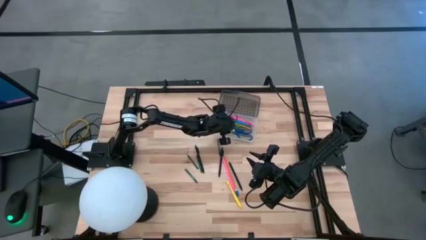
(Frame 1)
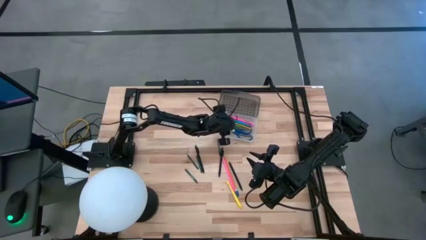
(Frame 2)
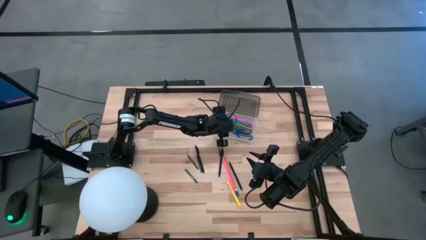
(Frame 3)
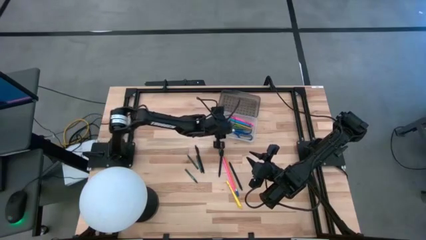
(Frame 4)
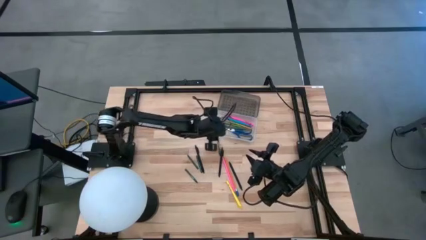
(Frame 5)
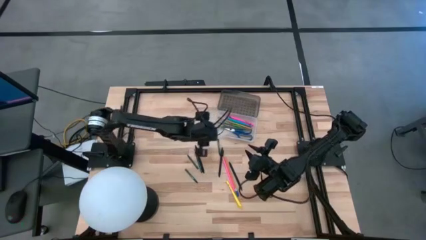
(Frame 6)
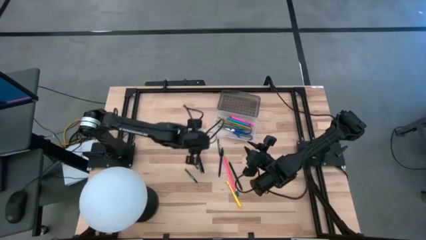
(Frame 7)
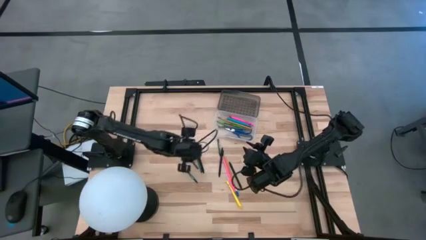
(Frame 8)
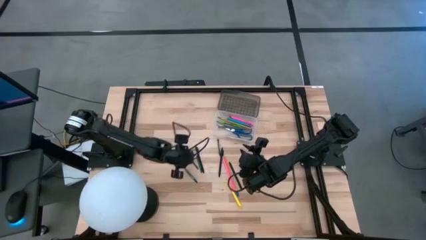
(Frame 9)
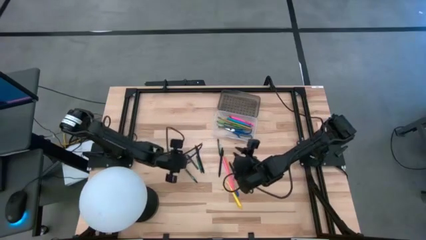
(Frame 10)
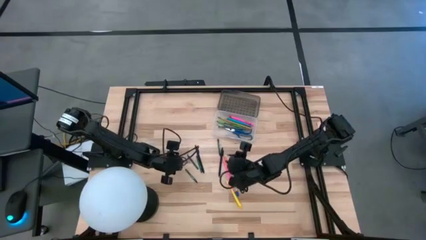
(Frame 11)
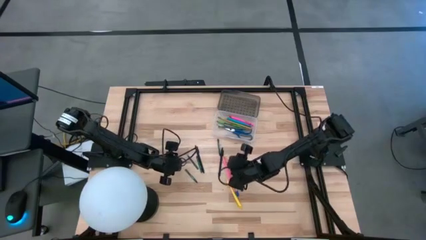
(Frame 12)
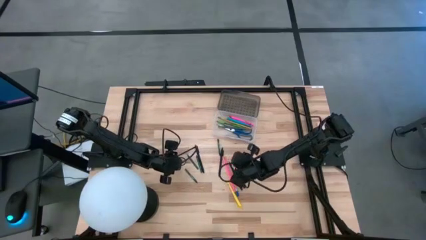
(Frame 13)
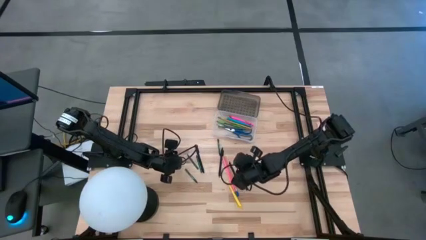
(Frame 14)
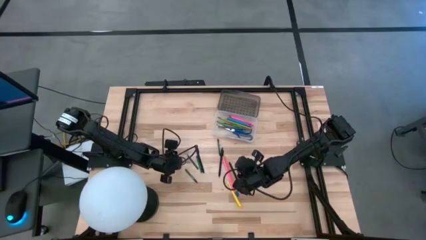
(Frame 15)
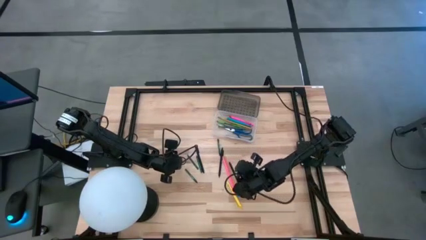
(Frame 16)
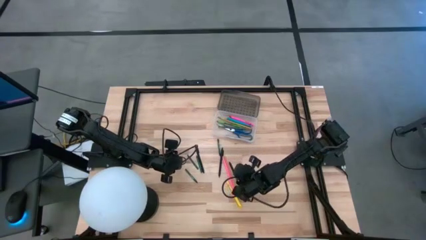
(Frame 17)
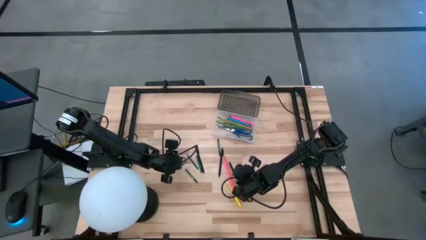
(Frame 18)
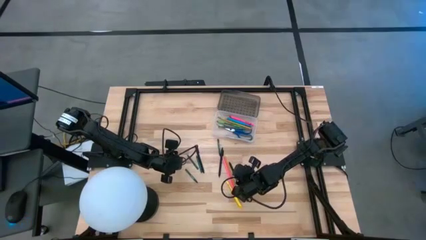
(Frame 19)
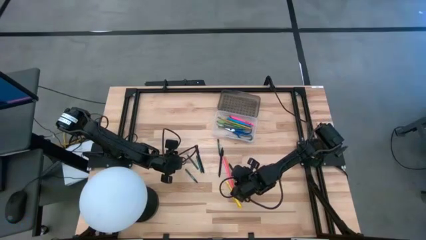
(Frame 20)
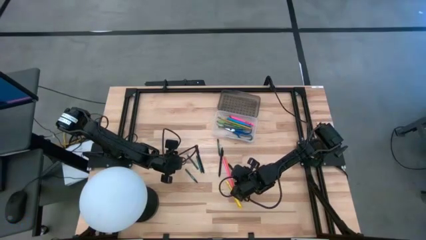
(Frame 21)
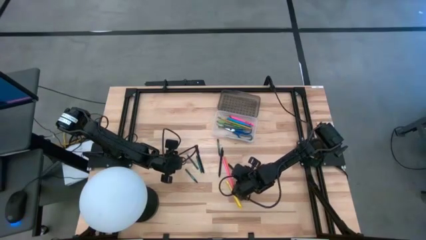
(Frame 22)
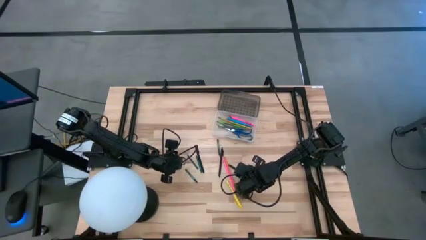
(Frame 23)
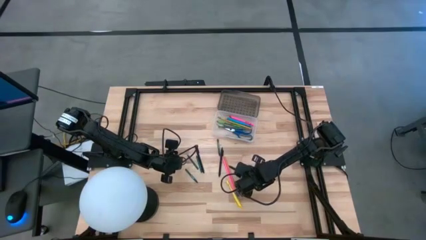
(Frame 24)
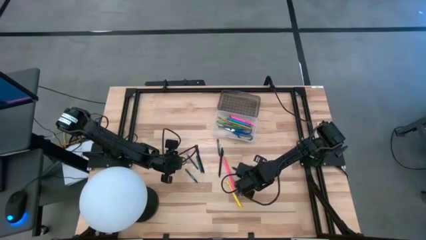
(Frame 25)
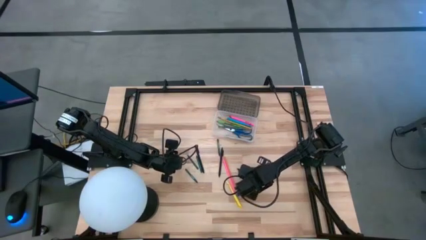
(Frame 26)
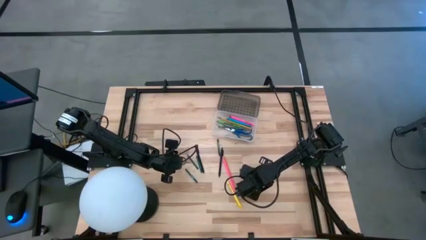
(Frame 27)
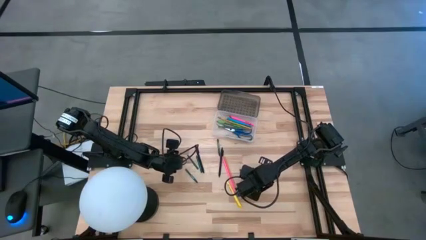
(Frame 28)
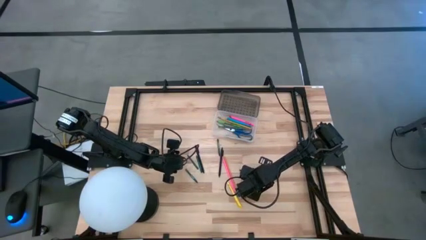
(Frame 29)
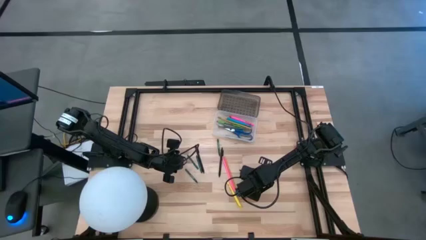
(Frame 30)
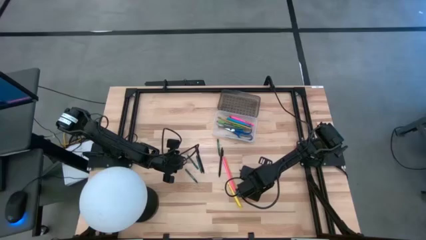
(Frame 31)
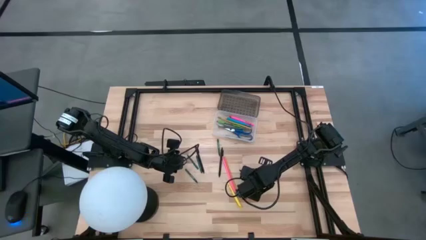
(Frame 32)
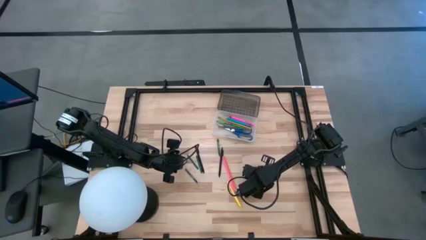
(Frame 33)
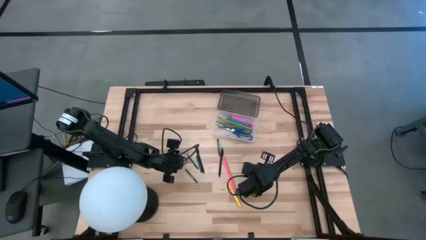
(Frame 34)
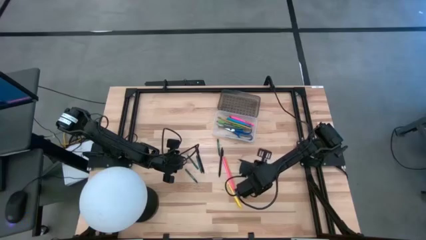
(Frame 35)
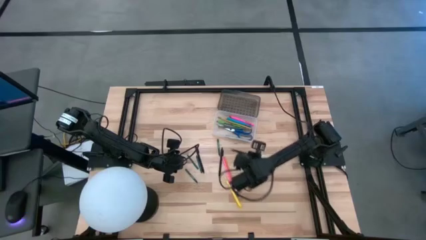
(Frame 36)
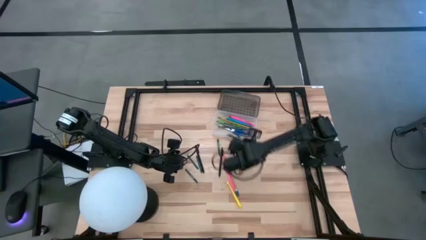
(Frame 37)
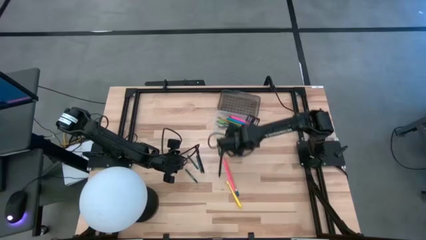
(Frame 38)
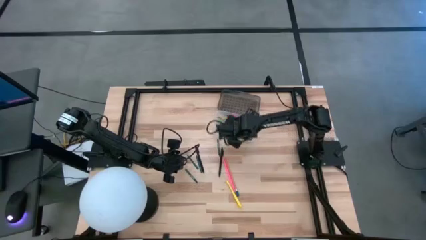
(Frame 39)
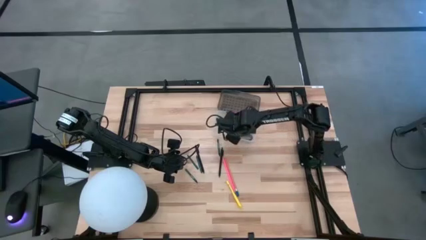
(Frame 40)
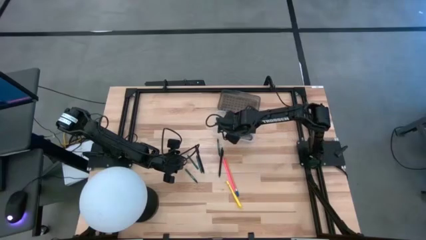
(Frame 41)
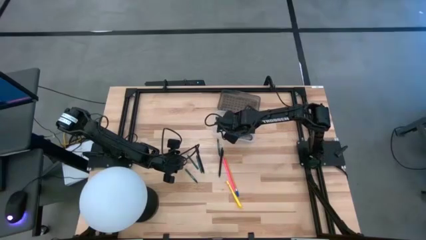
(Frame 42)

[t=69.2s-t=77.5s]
Task: Pick & place school supplies into a supply box
Put the right black pen into the black supply box

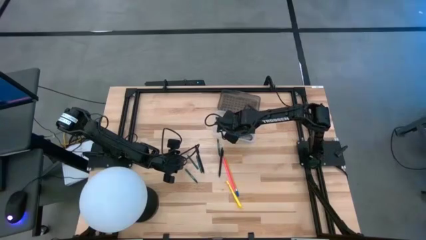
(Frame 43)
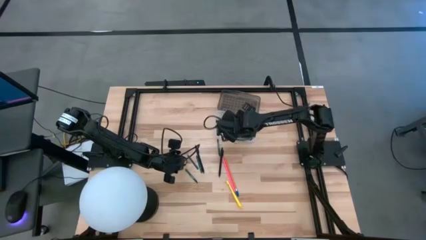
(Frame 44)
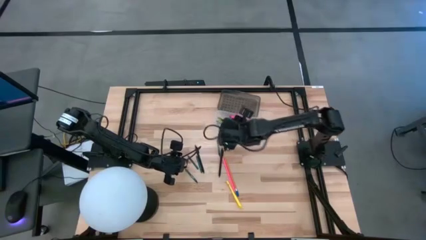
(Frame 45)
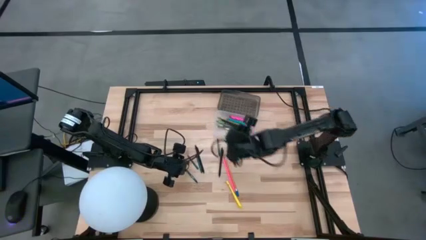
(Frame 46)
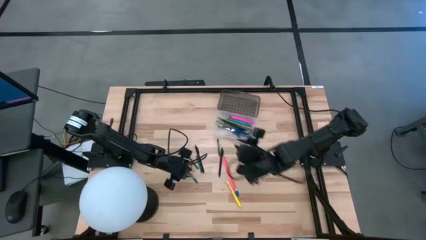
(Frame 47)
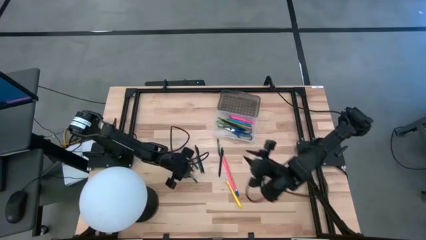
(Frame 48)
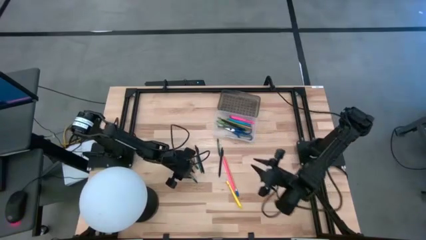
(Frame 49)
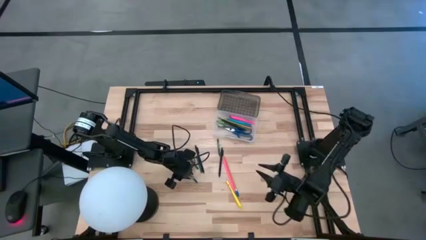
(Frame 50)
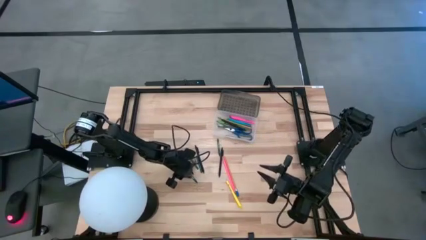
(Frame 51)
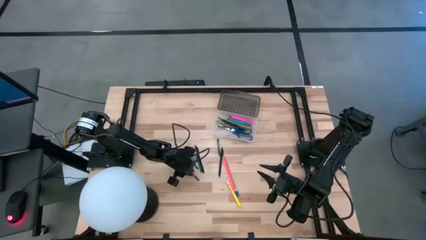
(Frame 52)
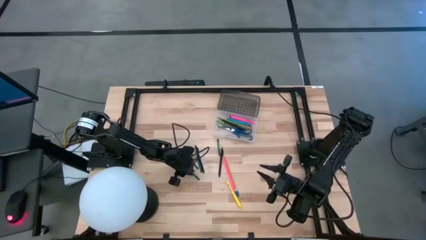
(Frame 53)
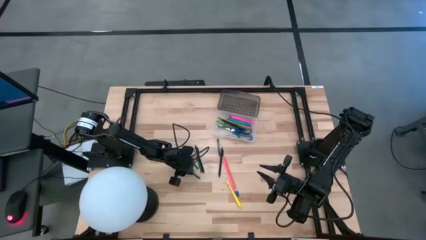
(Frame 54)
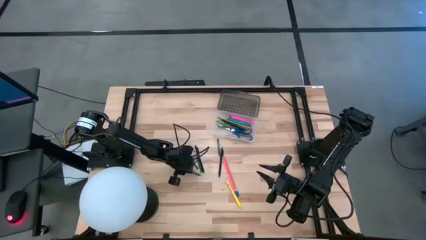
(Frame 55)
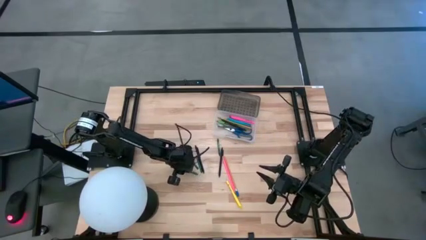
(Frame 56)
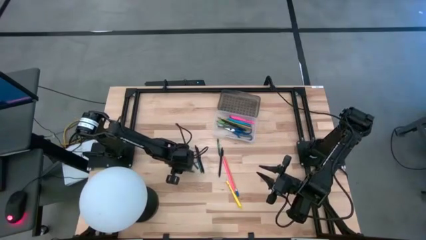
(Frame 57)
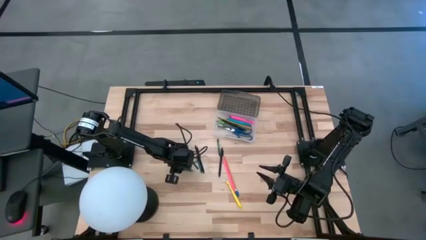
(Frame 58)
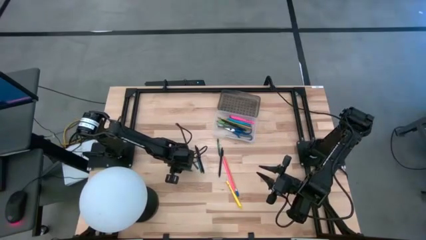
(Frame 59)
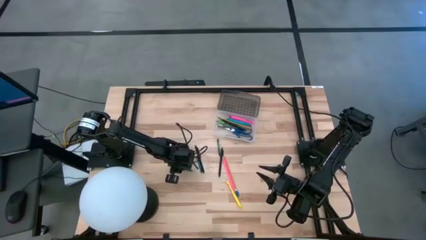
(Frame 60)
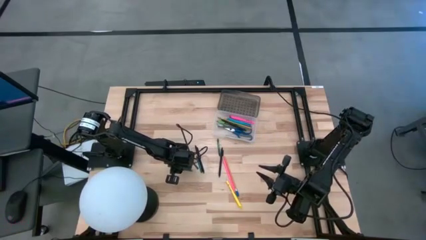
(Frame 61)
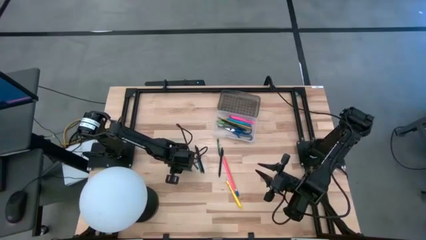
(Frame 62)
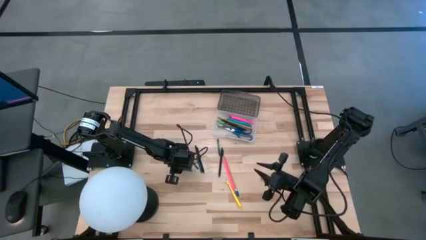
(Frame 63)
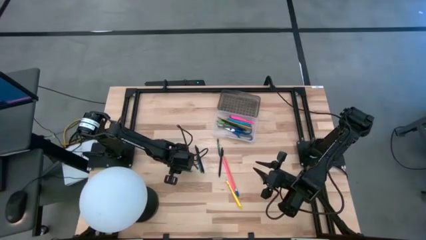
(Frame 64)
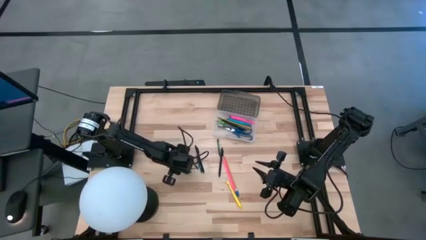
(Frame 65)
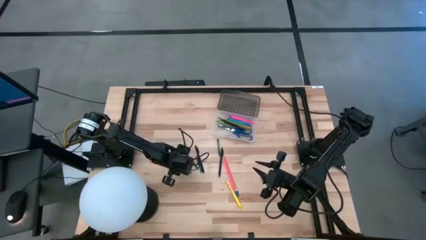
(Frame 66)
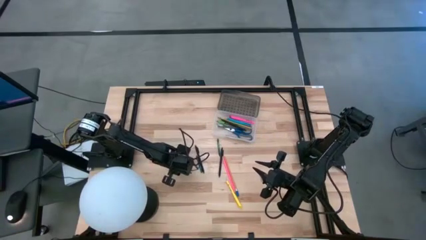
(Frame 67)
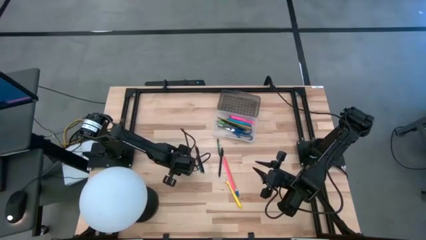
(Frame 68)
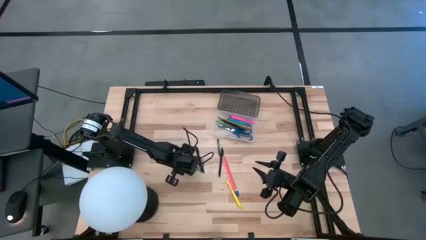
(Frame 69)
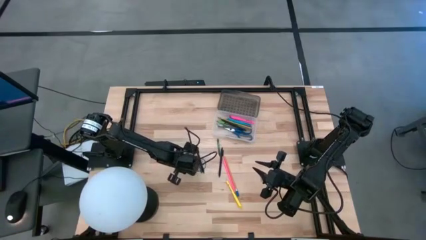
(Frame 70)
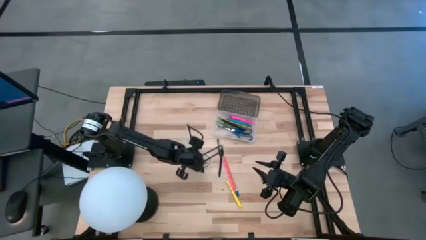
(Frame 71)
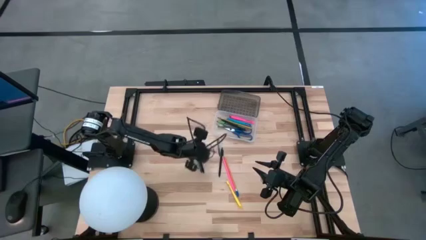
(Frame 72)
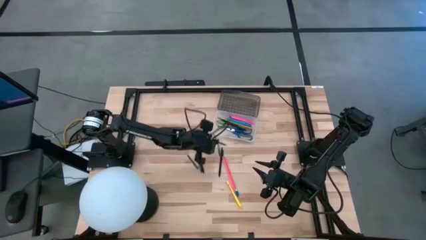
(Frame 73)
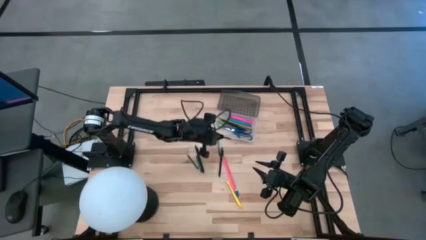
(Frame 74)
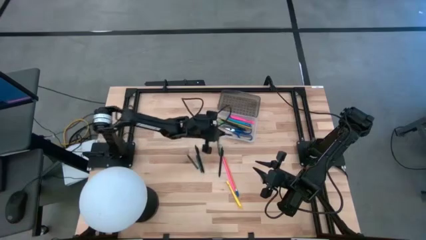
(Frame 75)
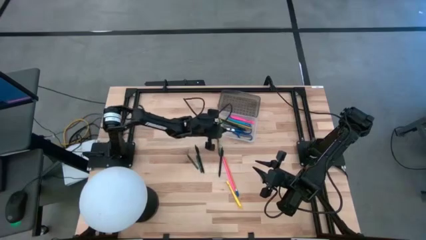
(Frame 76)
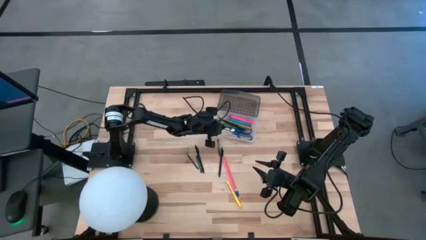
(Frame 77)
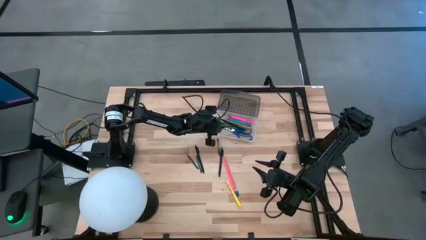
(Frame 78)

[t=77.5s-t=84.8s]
Put the green crayon into the black supply box
